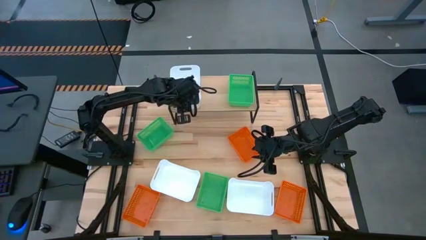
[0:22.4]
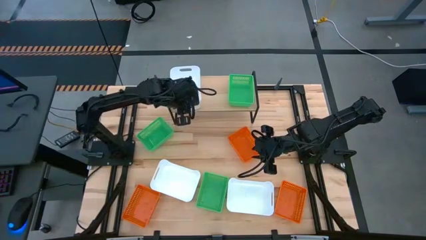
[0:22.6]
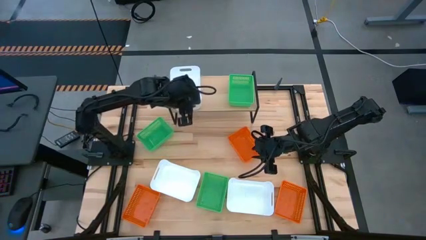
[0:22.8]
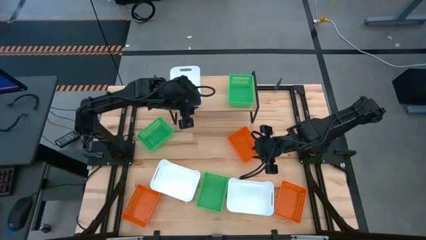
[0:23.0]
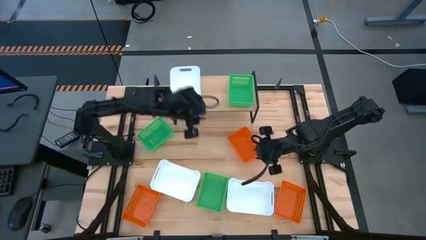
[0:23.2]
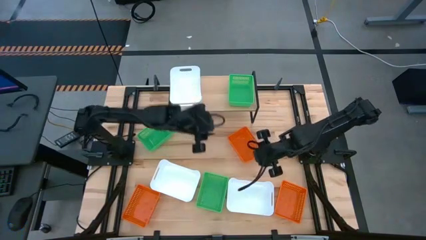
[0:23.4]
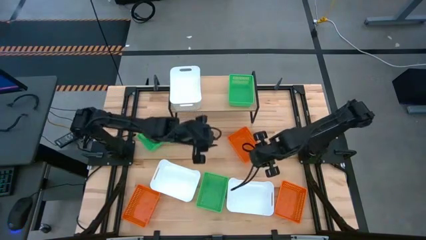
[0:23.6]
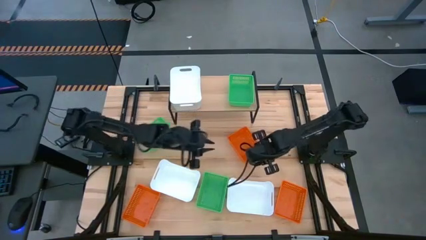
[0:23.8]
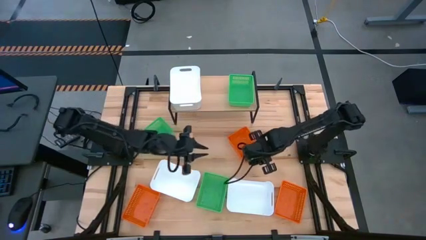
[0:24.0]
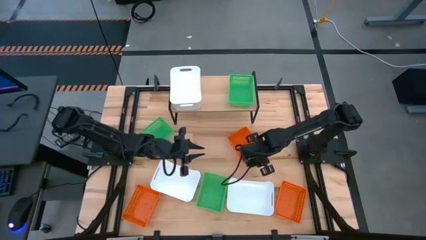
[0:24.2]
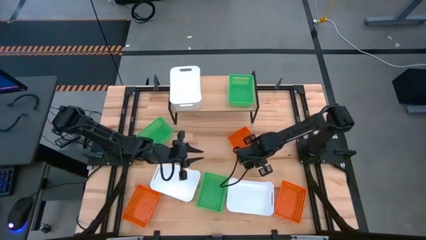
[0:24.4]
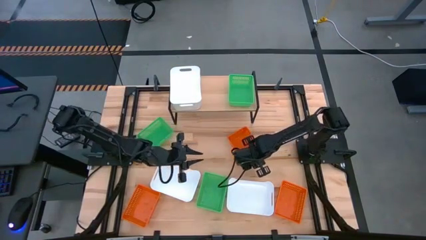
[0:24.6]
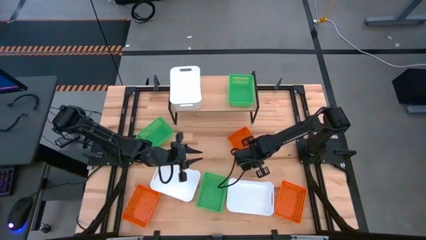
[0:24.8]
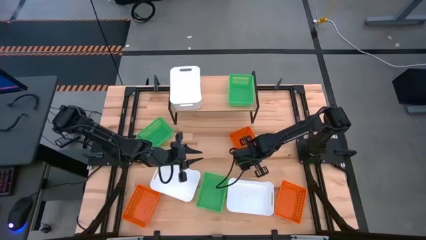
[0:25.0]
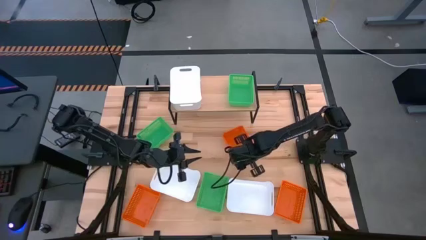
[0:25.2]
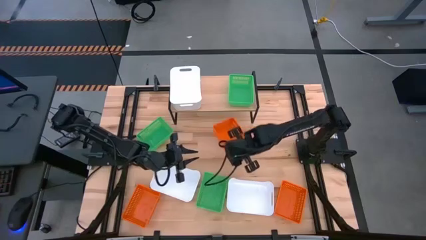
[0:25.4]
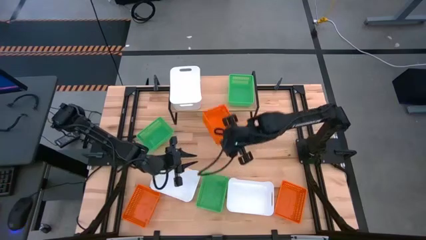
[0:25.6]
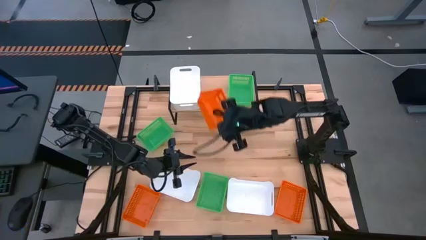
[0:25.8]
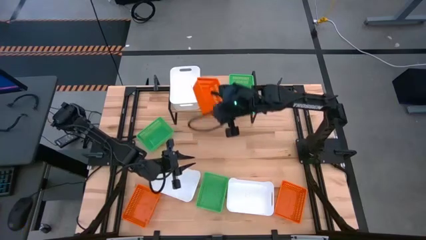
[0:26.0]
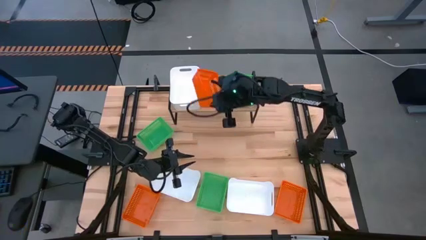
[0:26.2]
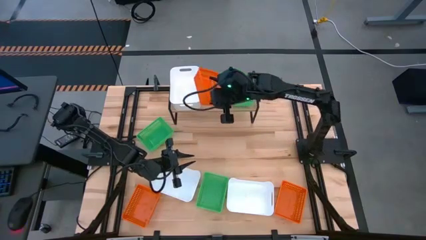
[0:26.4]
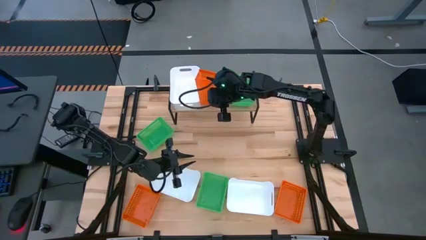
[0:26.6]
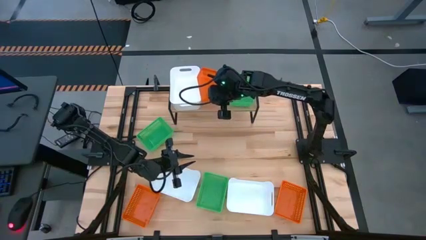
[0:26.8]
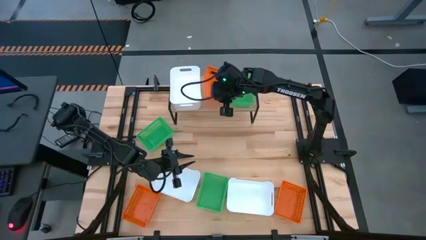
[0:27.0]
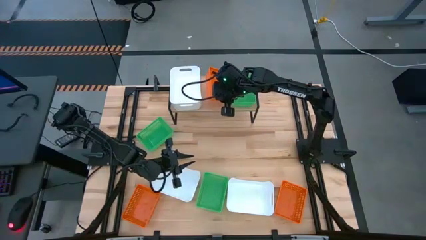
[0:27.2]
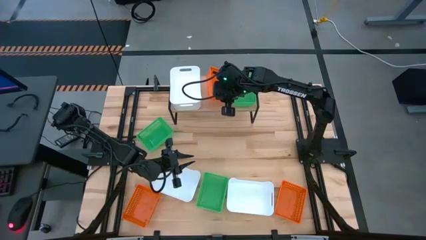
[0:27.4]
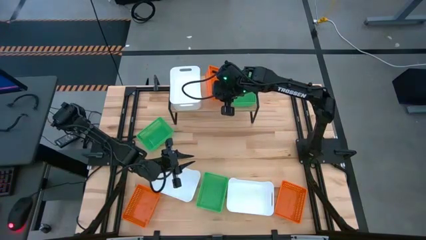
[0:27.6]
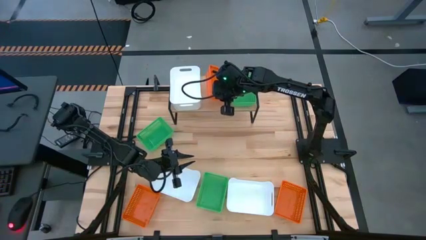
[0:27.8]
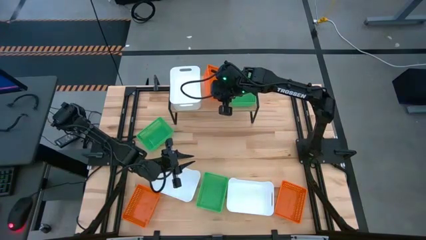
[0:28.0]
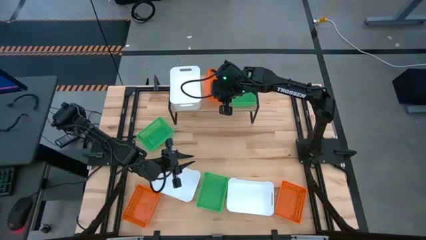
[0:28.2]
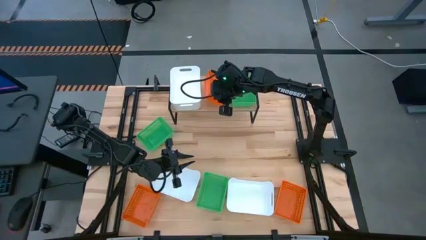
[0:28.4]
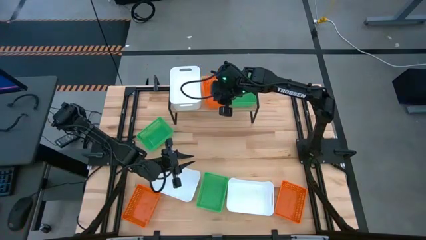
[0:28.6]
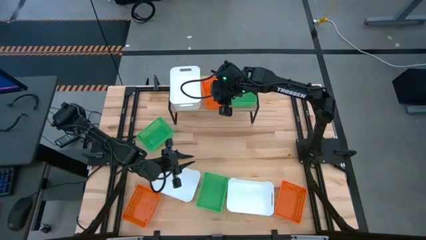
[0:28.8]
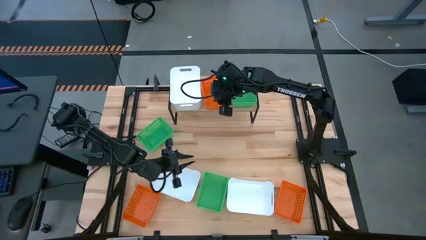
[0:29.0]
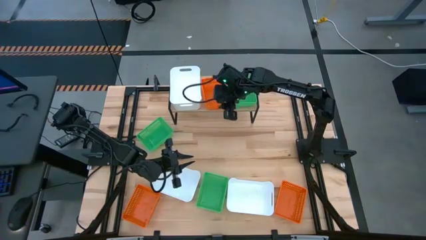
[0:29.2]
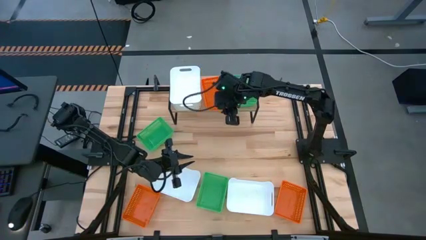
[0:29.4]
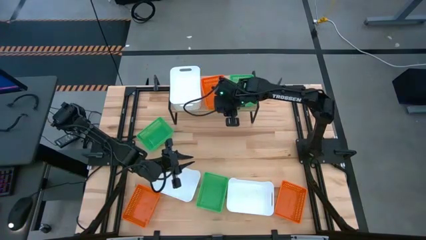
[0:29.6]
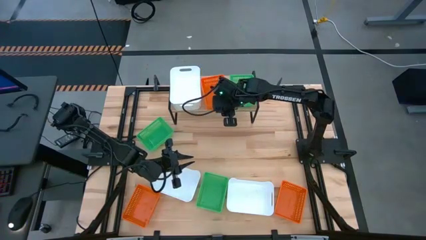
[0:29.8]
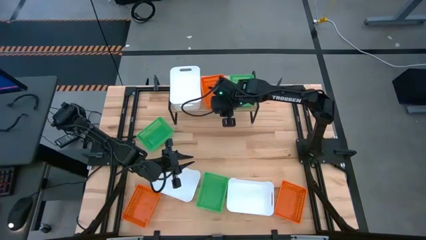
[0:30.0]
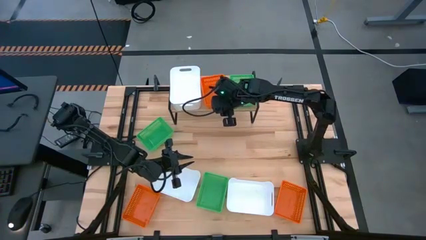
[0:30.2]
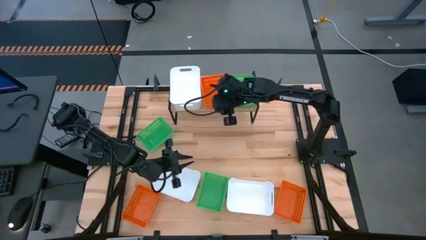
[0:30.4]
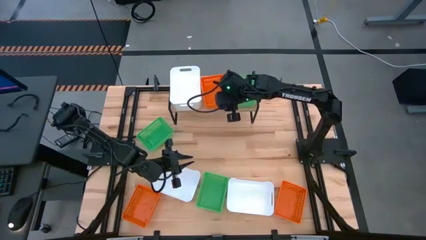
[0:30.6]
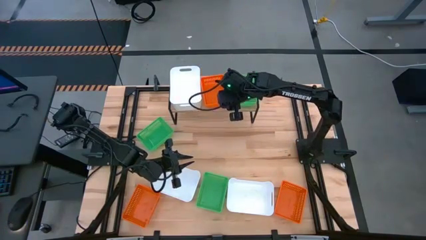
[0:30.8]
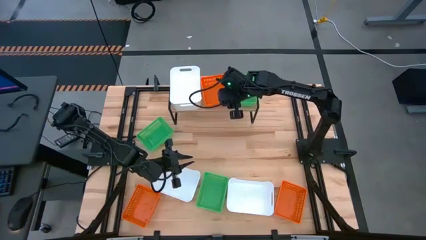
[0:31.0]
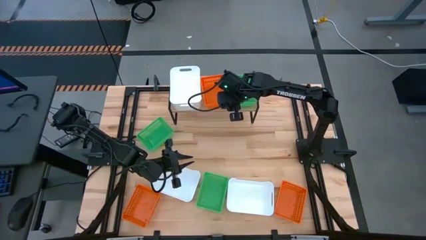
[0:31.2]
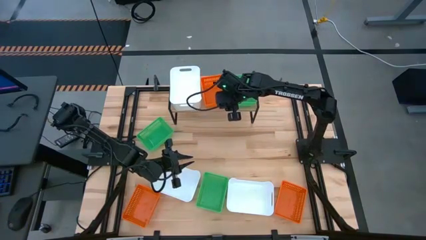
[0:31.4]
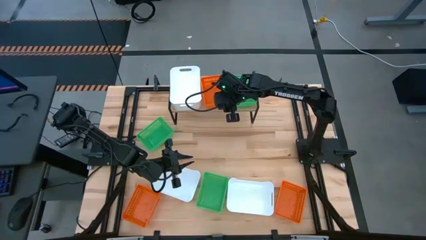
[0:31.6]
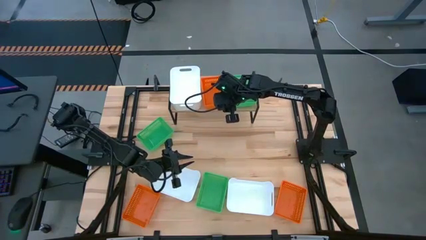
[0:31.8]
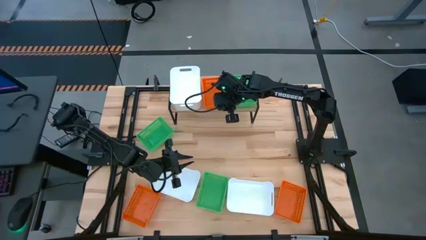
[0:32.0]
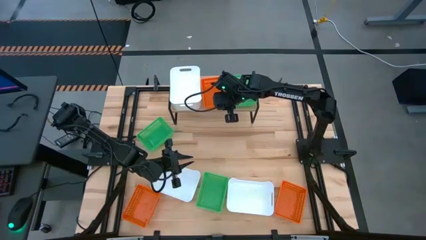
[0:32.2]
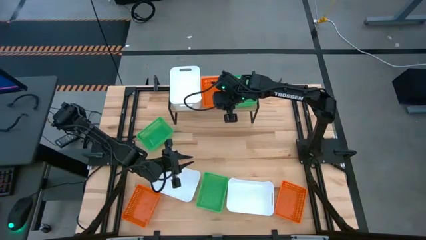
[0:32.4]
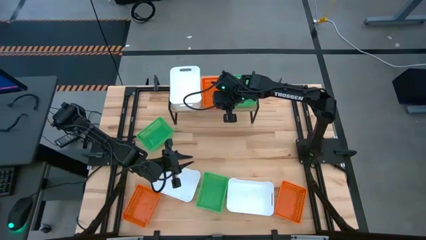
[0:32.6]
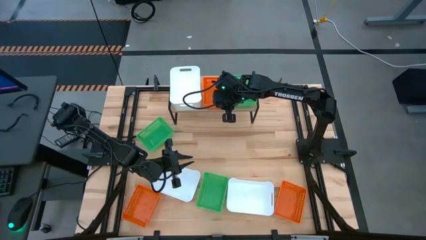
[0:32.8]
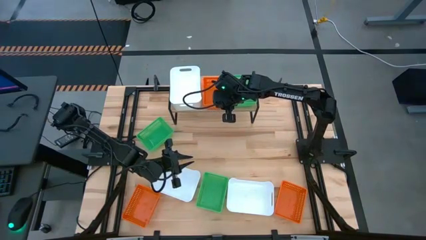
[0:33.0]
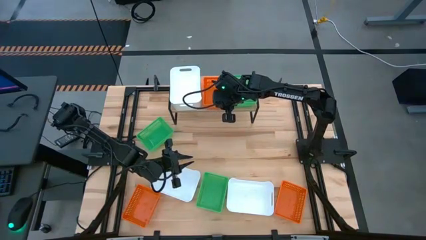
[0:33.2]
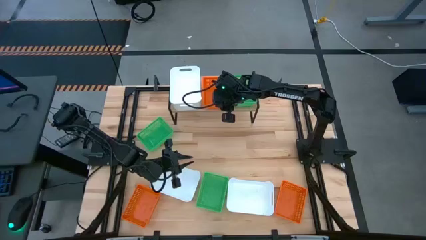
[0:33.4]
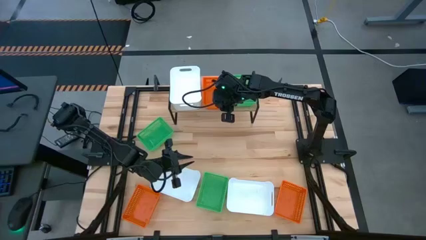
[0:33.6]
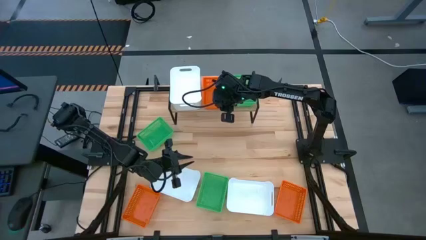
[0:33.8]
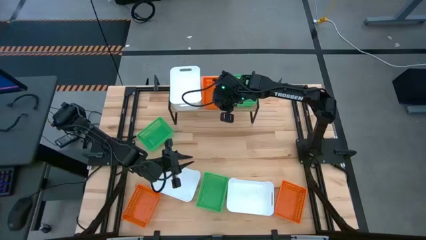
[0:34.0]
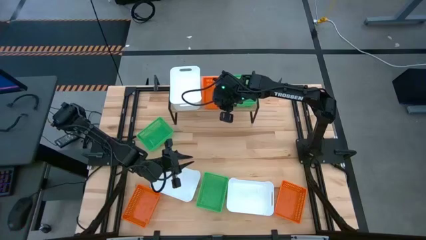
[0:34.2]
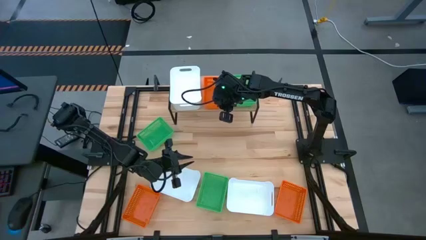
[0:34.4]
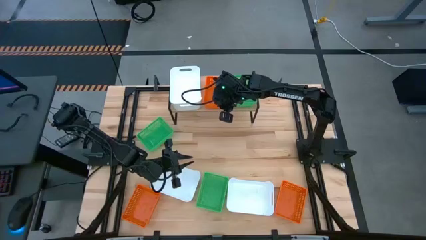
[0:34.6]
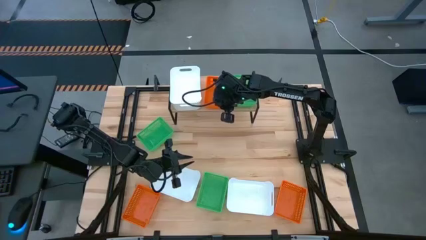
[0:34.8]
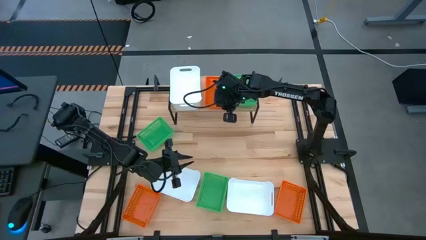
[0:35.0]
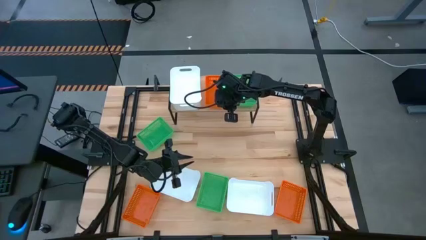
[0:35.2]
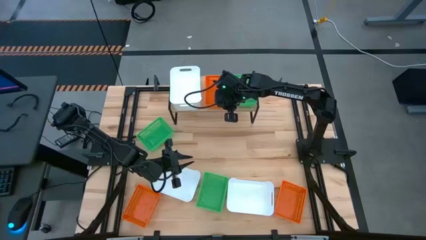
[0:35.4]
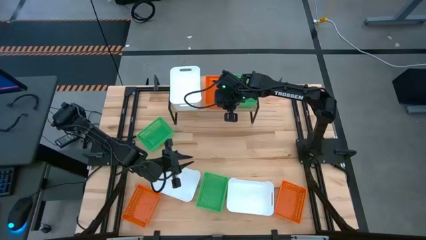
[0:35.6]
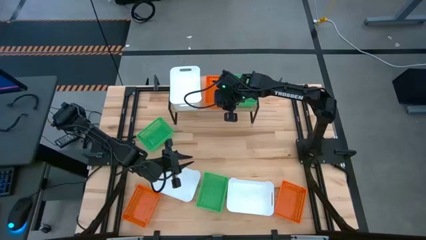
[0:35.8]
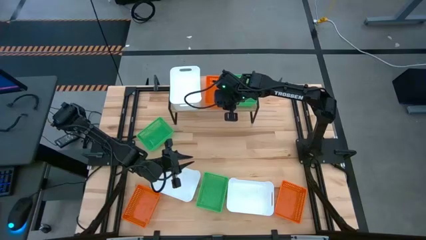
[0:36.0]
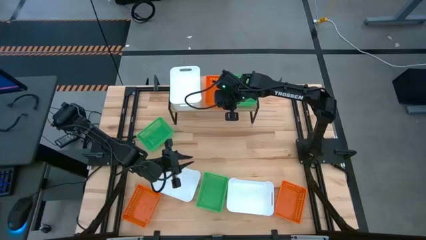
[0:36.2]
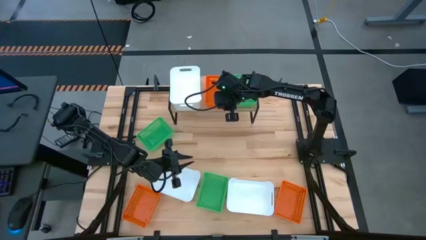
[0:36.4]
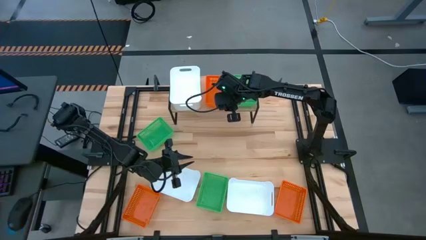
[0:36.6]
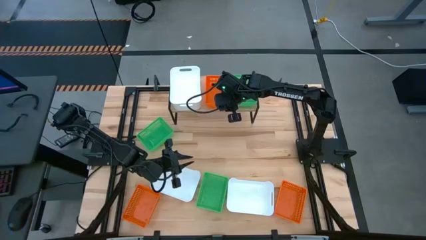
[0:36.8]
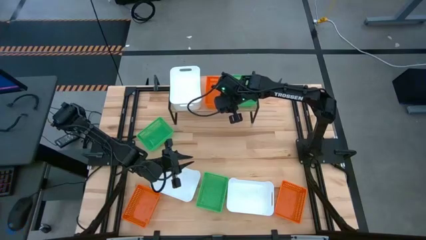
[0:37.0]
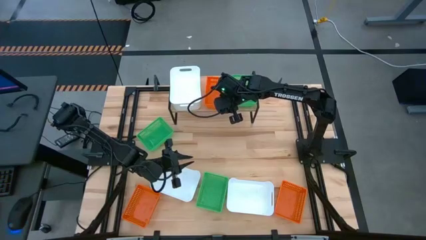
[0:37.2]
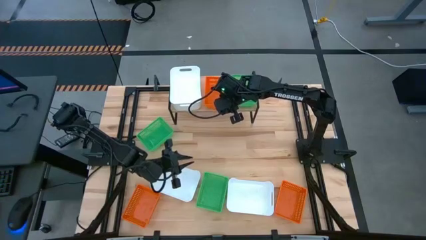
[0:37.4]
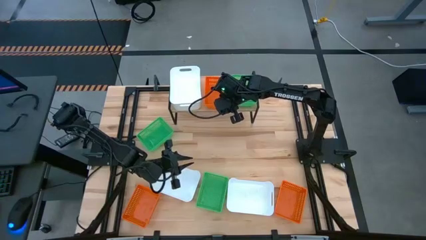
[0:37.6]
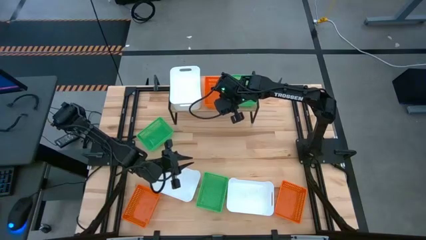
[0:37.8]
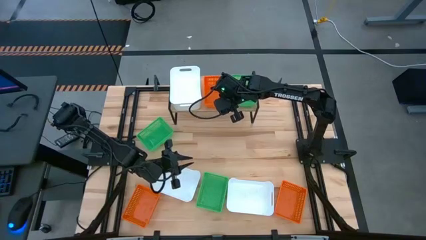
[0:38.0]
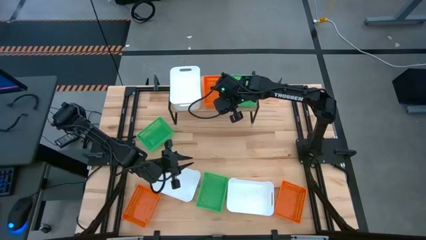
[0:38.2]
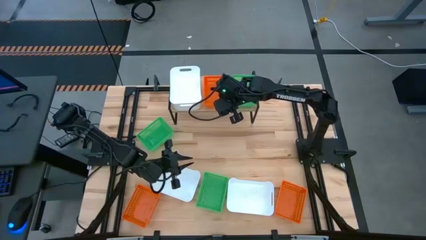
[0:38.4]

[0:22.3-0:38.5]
Task: Stack baskets on shelf by color
Put the top orange bin on the shelf
